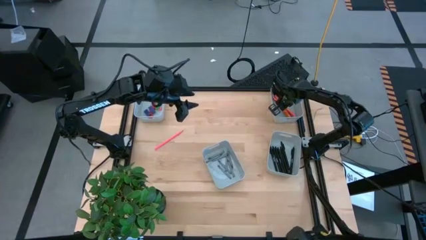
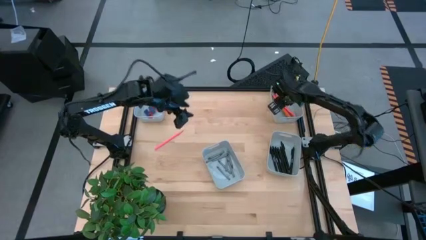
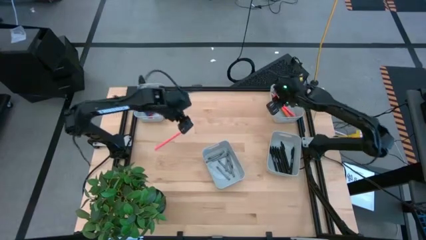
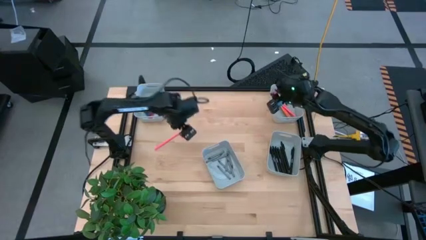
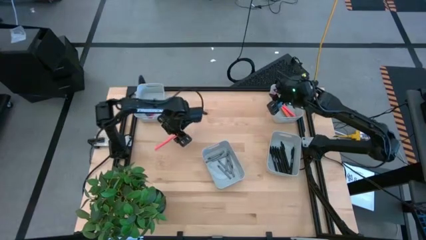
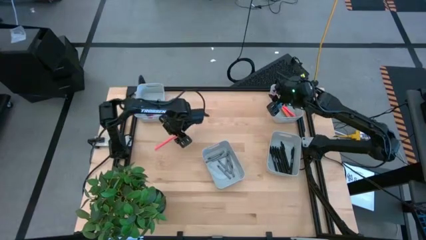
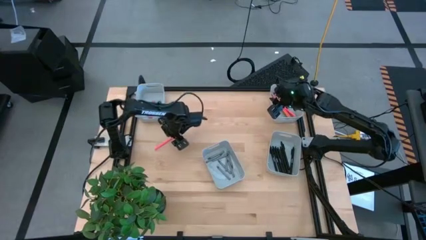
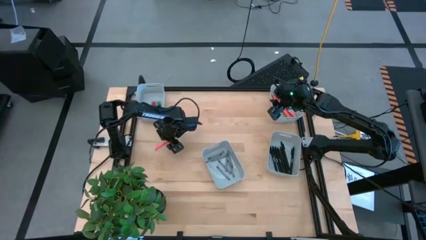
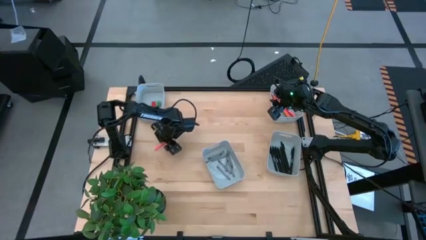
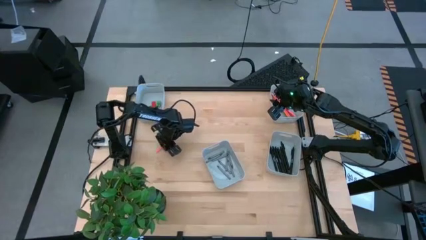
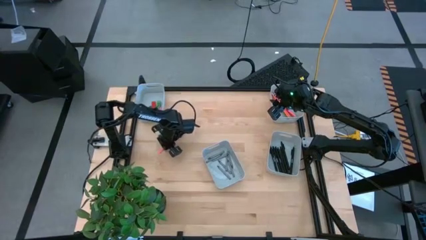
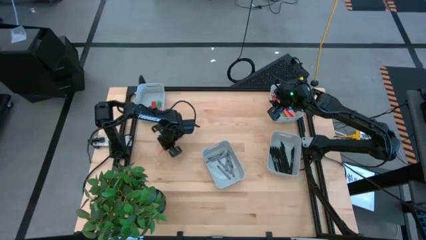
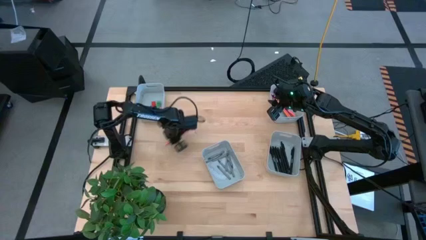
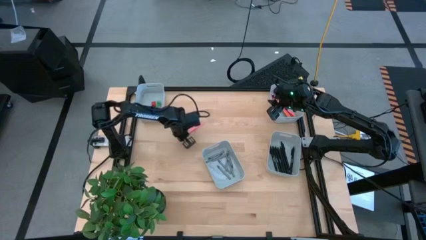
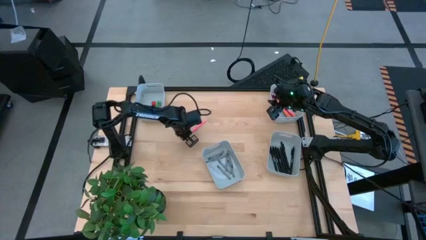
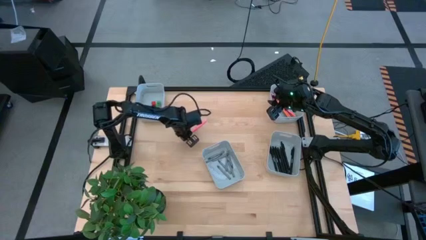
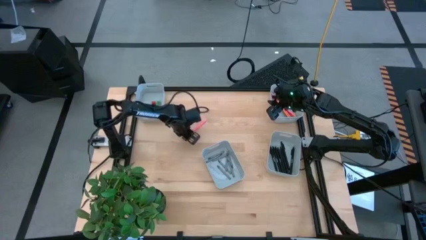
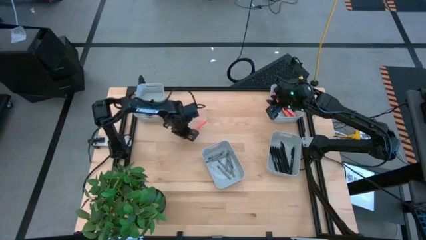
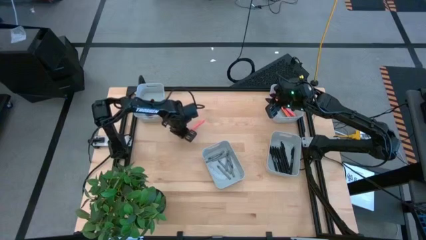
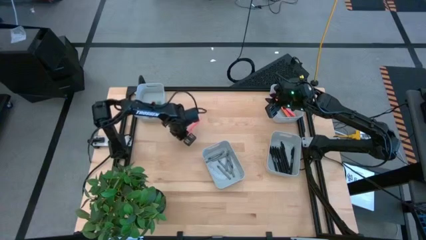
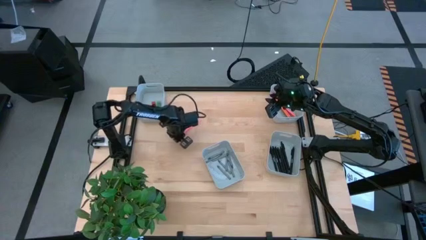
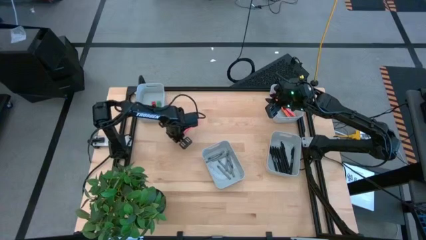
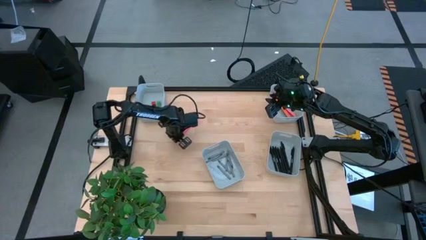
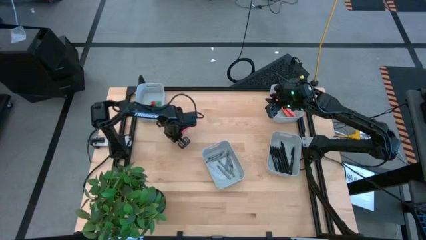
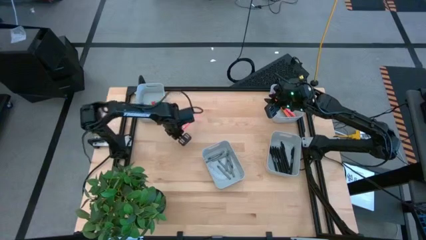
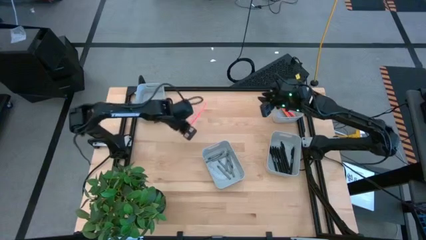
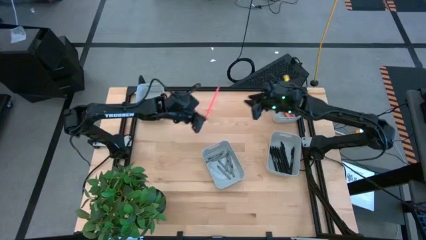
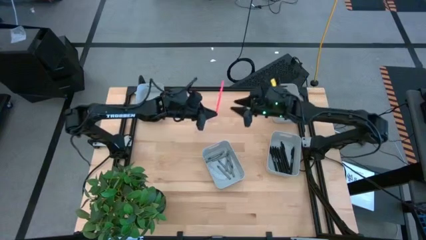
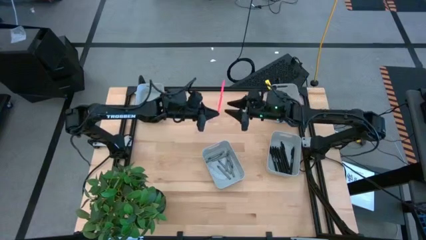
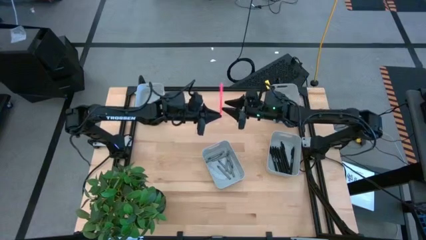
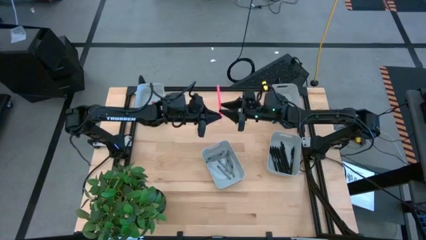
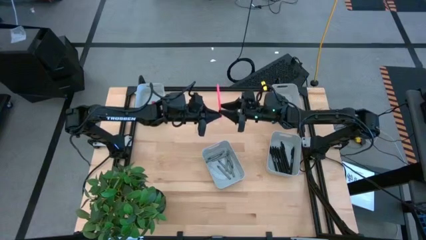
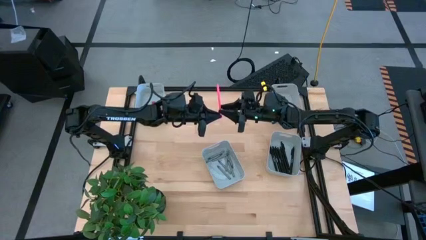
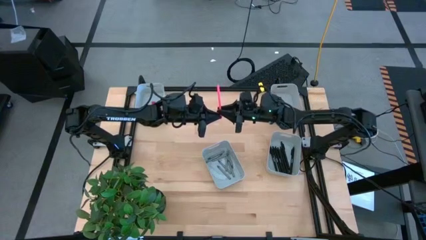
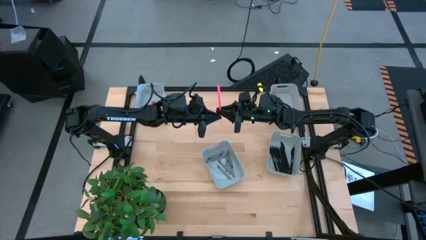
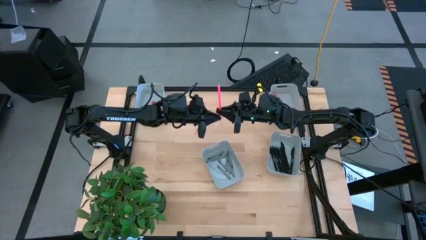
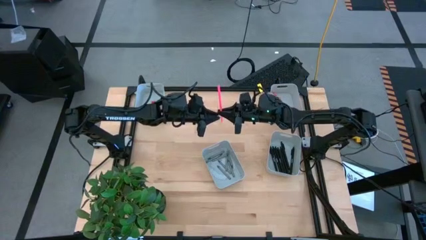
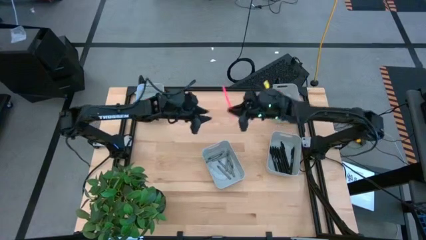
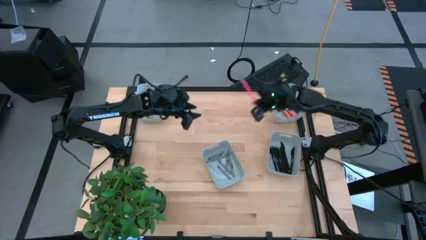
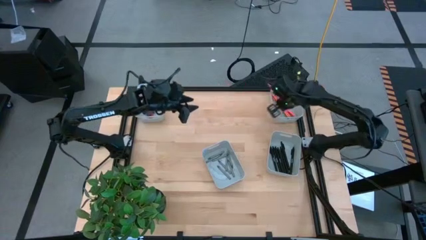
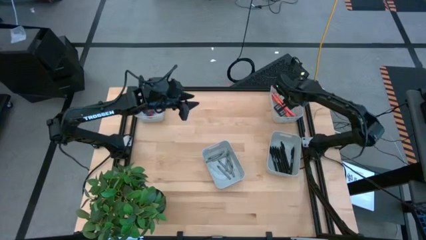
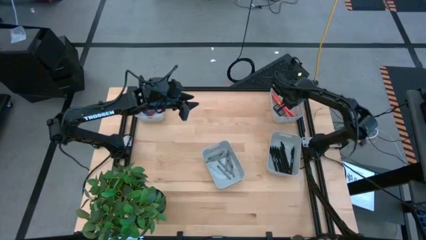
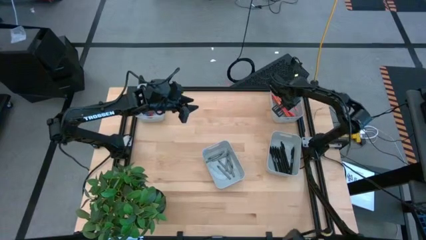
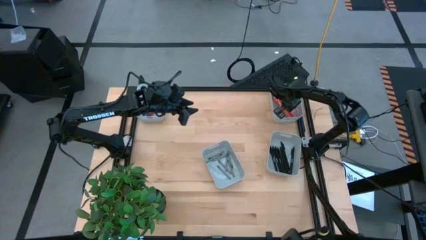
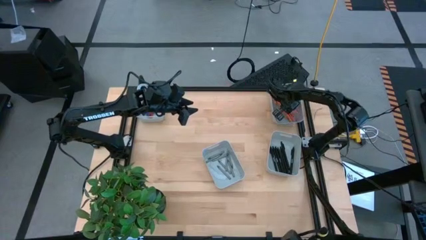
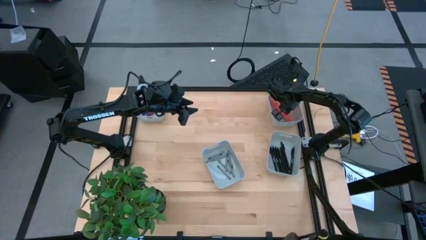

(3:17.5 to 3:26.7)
Task: Sort crayons/erasers/pens/pencils in bins
Put the pink pencil into the top right gray bin

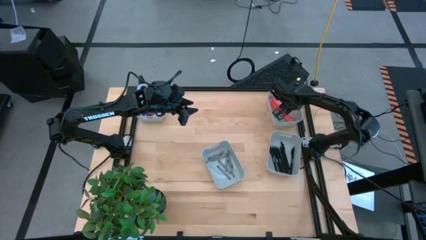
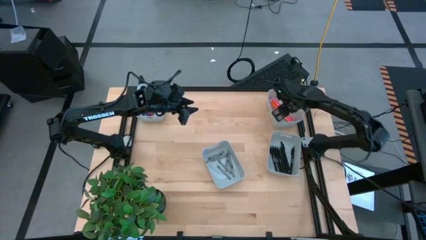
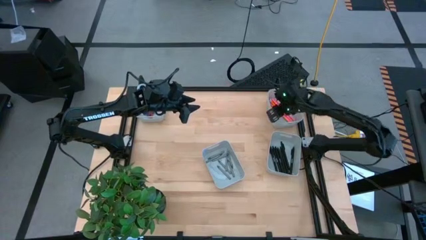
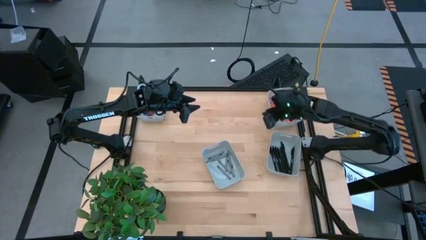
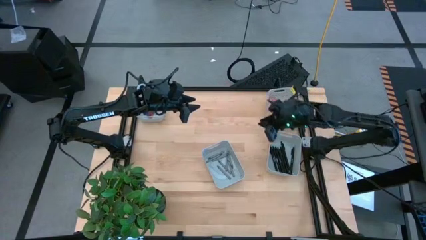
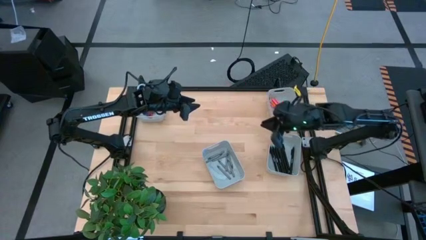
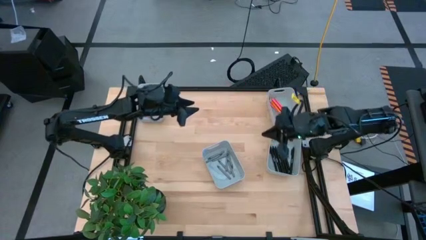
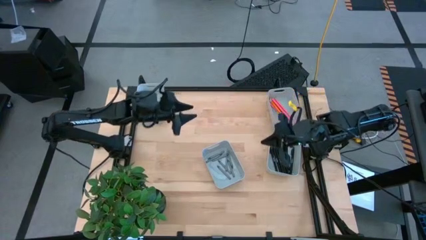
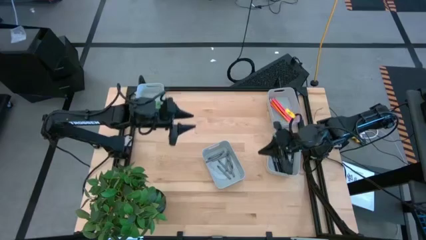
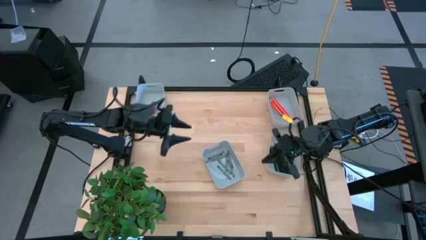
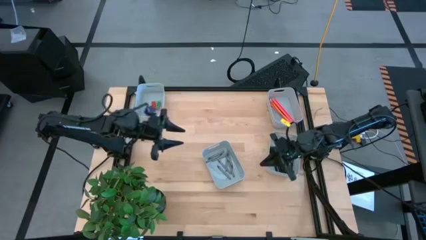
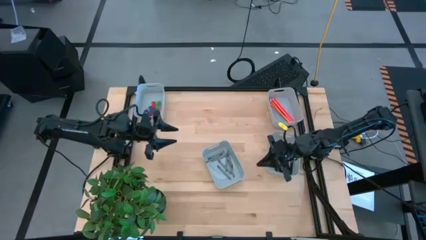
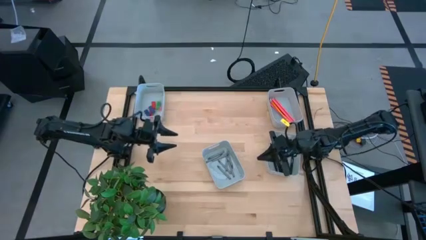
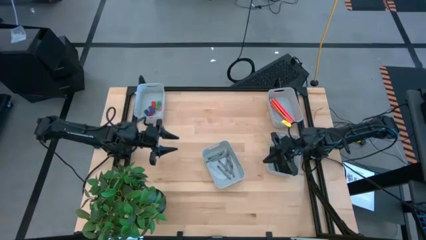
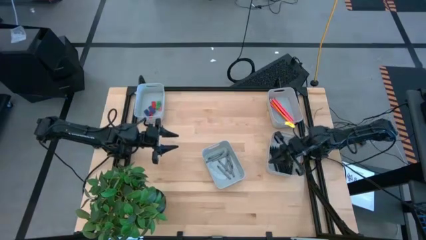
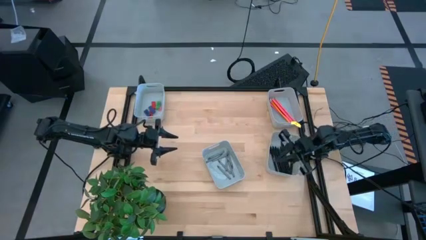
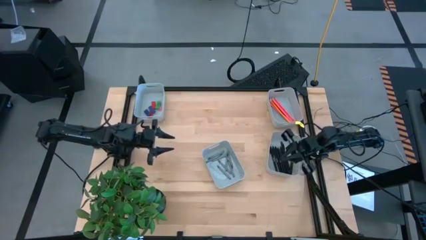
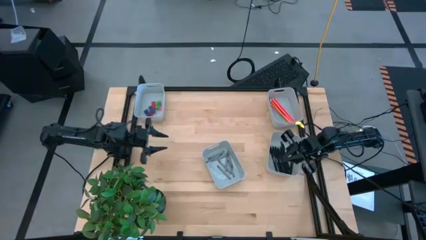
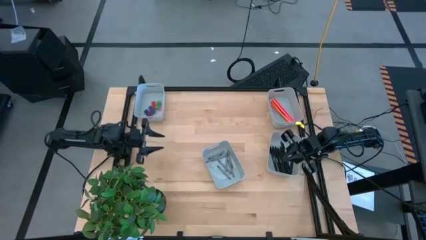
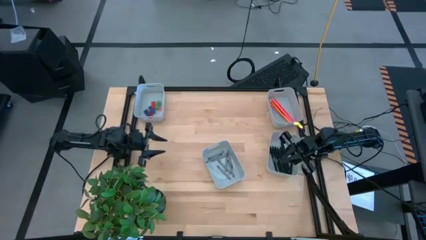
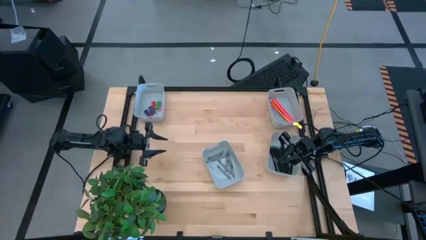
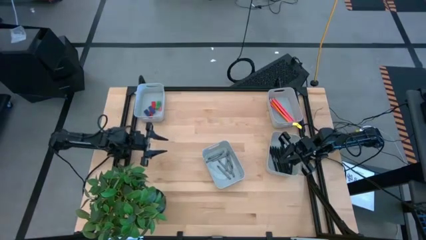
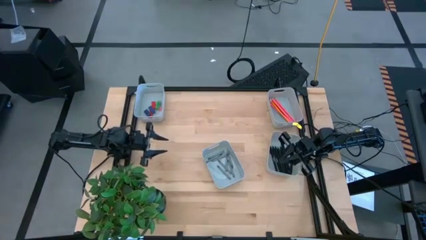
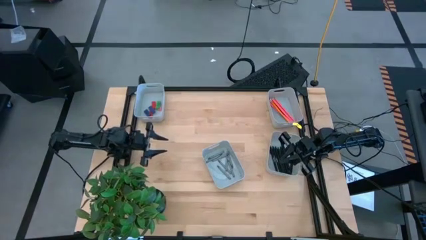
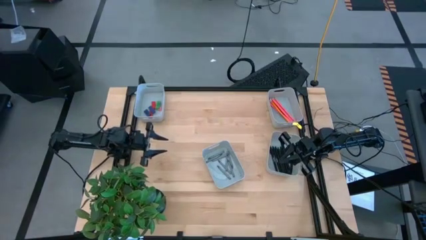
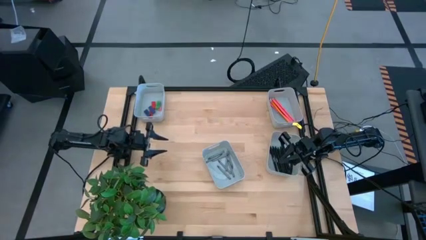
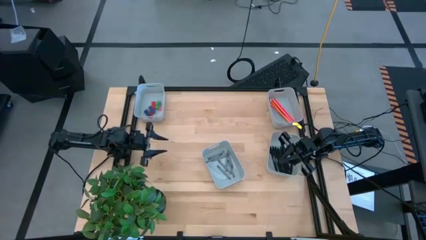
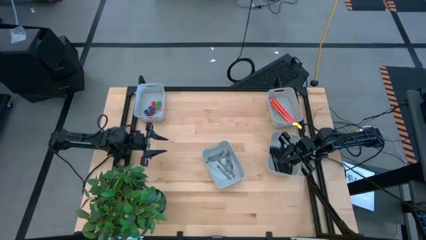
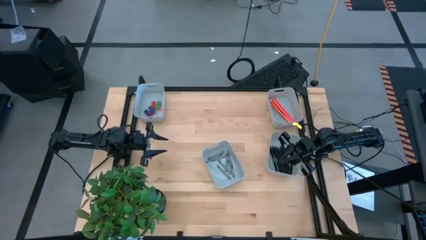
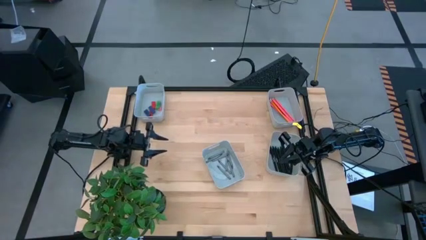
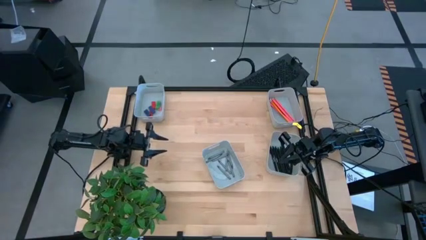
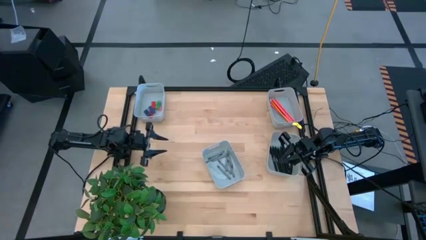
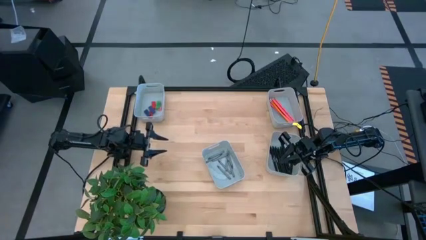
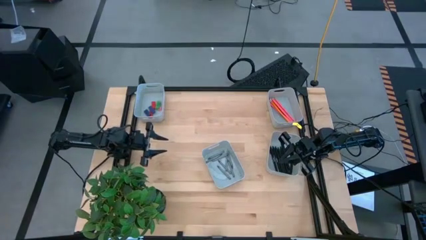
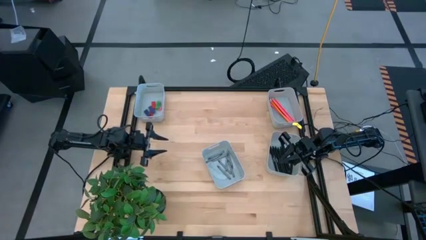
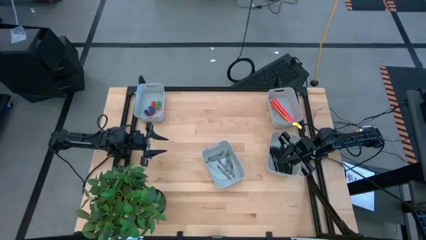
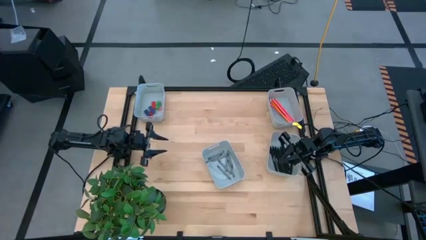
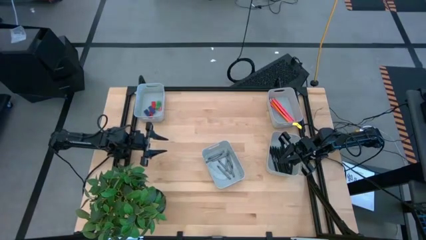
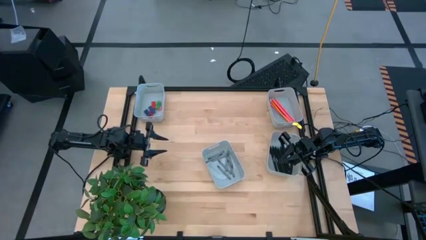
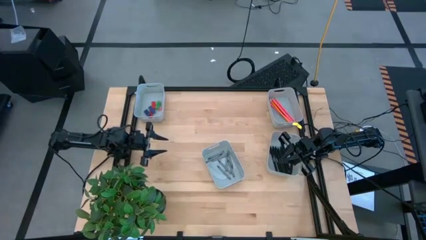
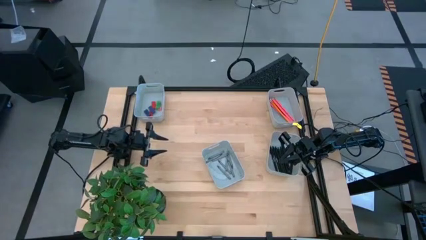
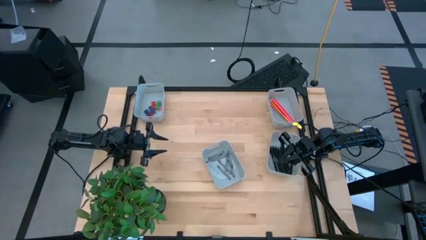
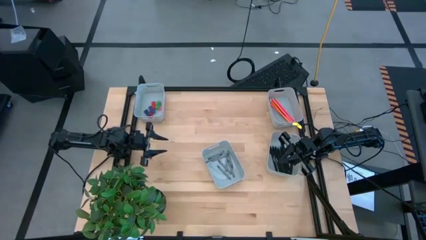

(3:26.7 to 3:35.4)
Return to Home Position
